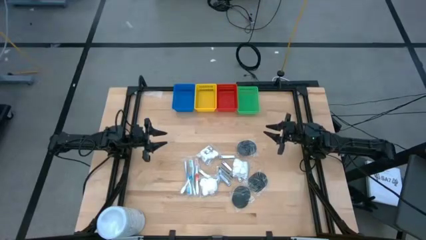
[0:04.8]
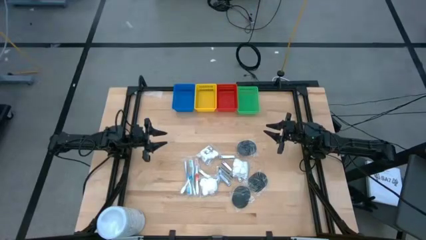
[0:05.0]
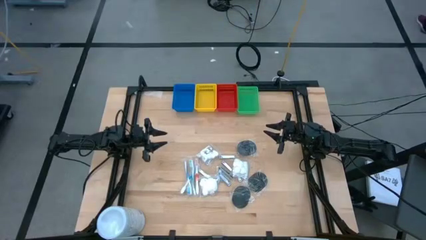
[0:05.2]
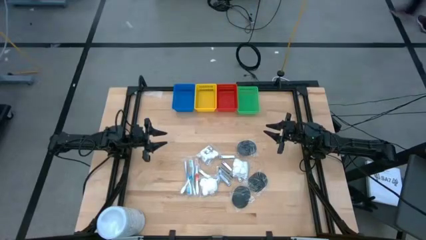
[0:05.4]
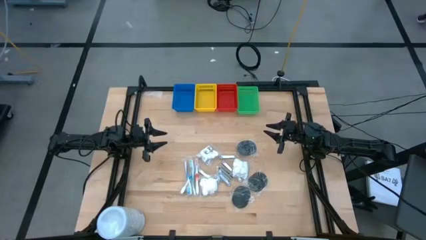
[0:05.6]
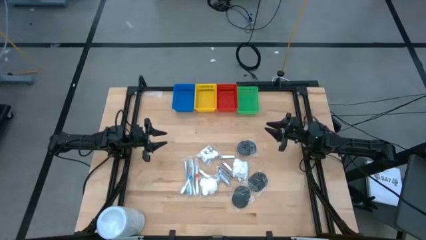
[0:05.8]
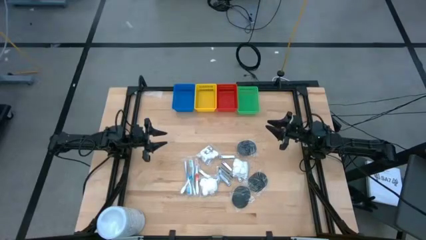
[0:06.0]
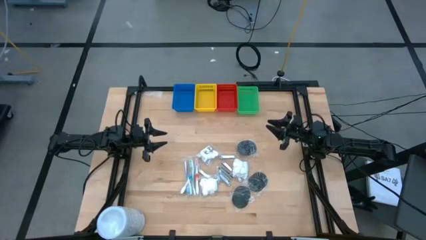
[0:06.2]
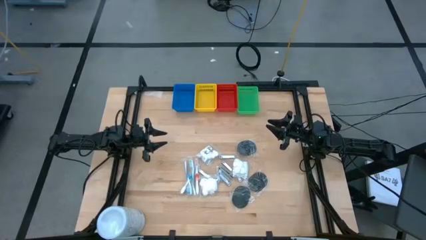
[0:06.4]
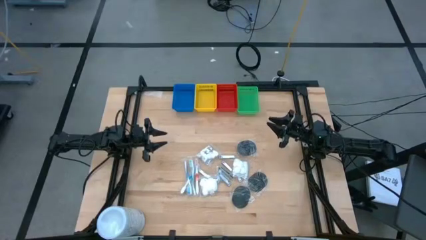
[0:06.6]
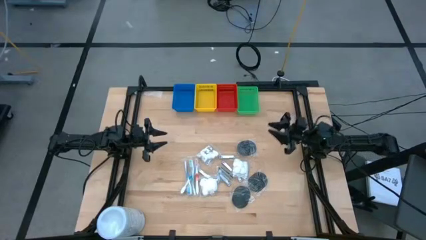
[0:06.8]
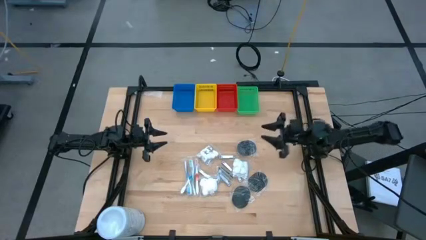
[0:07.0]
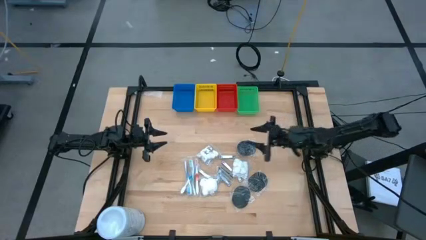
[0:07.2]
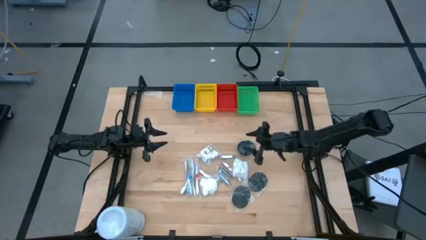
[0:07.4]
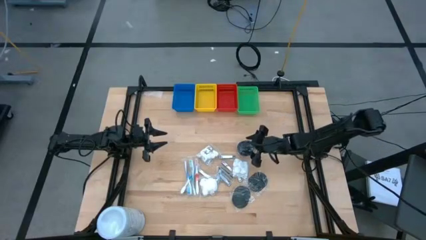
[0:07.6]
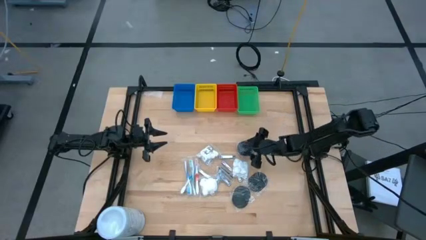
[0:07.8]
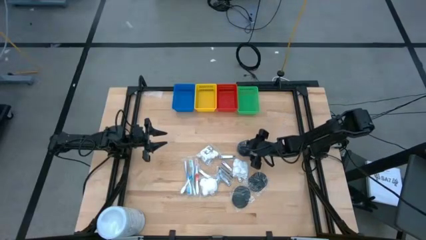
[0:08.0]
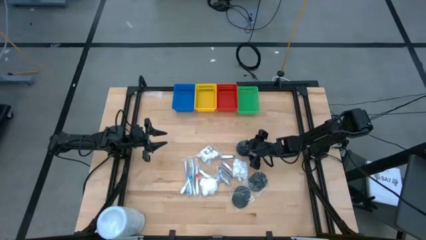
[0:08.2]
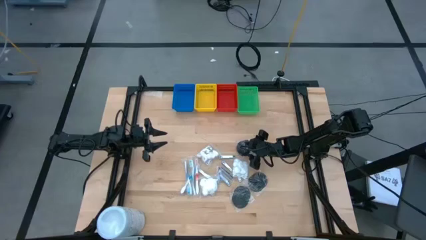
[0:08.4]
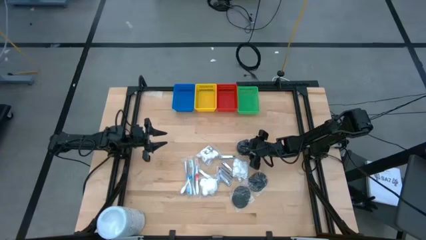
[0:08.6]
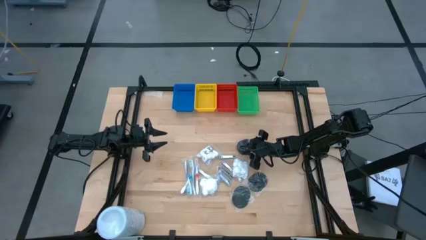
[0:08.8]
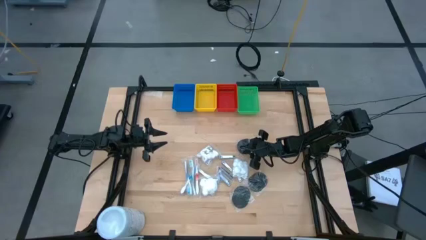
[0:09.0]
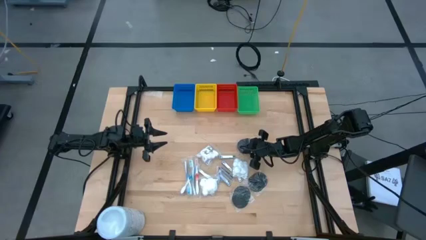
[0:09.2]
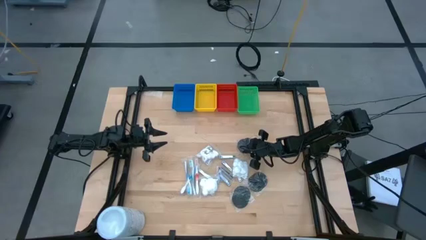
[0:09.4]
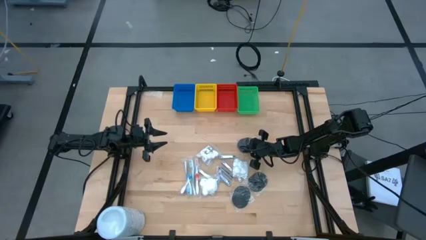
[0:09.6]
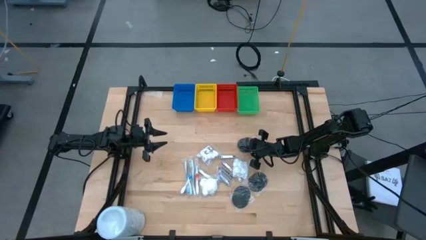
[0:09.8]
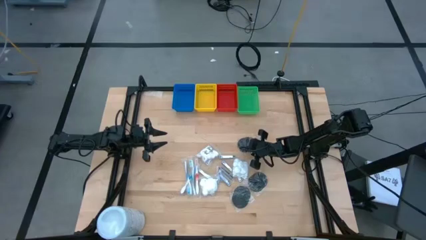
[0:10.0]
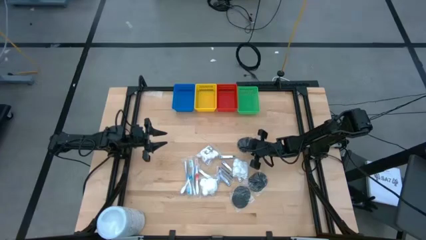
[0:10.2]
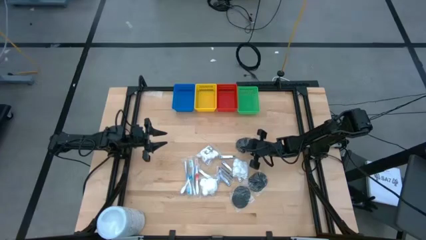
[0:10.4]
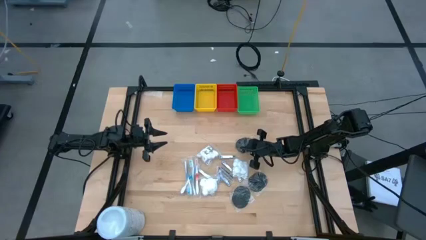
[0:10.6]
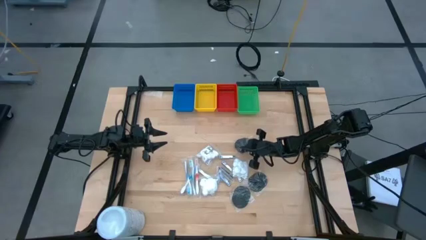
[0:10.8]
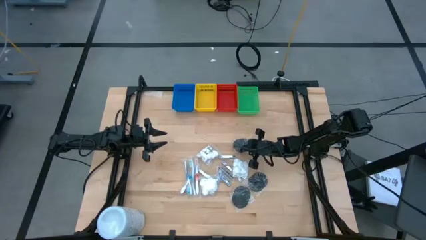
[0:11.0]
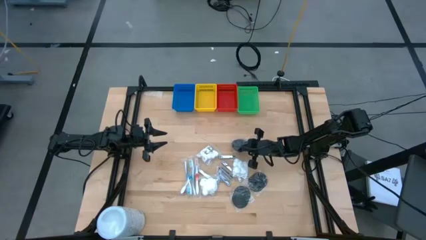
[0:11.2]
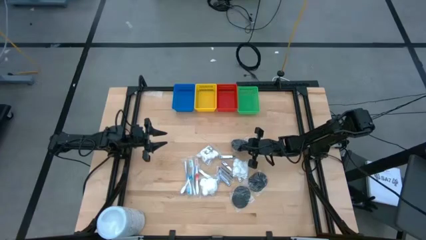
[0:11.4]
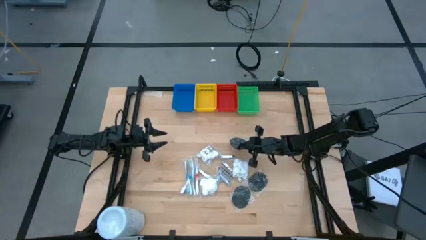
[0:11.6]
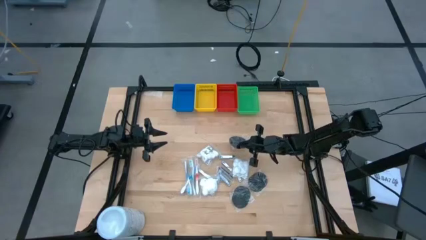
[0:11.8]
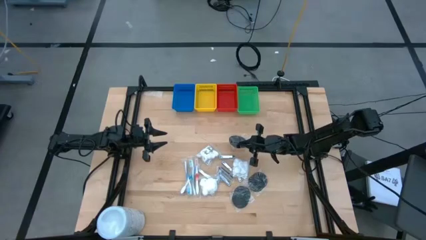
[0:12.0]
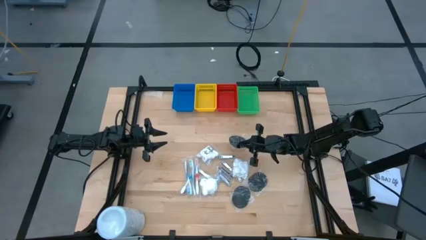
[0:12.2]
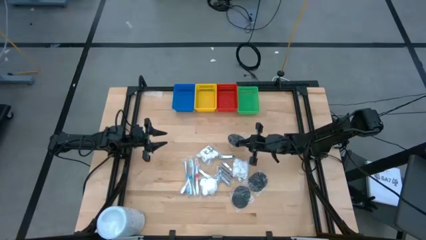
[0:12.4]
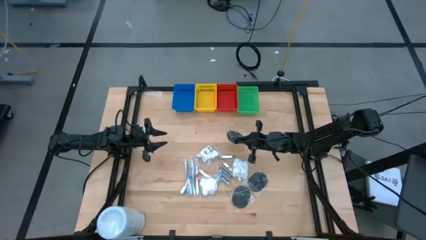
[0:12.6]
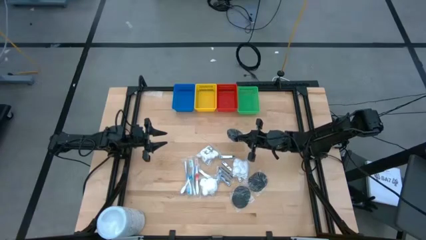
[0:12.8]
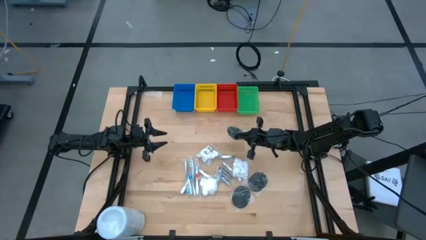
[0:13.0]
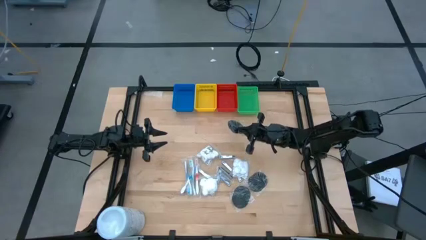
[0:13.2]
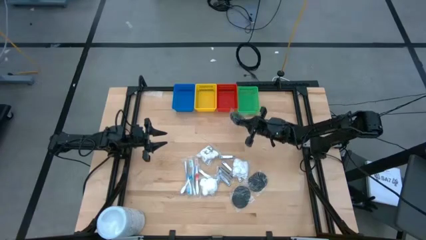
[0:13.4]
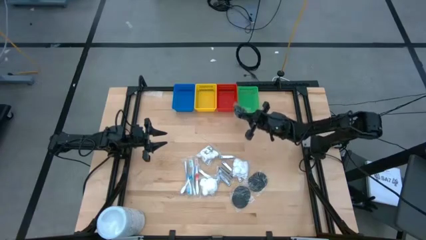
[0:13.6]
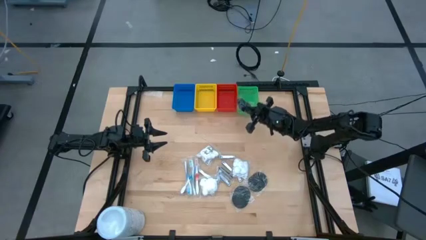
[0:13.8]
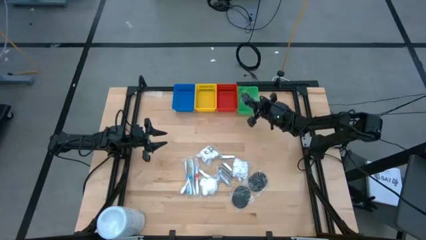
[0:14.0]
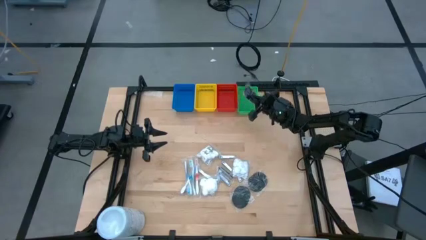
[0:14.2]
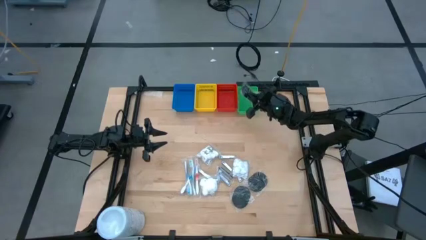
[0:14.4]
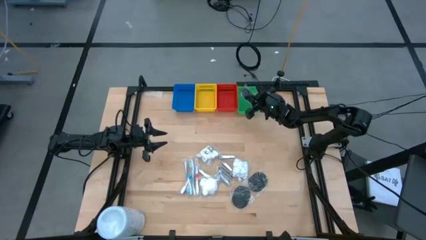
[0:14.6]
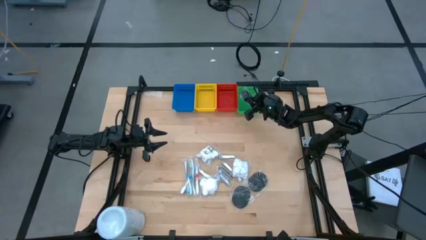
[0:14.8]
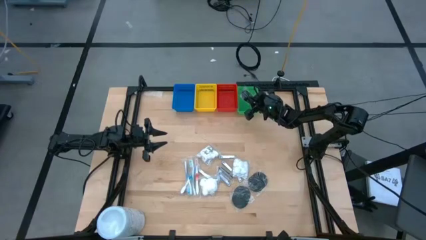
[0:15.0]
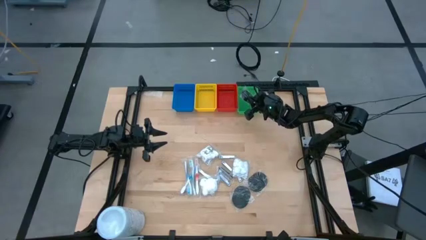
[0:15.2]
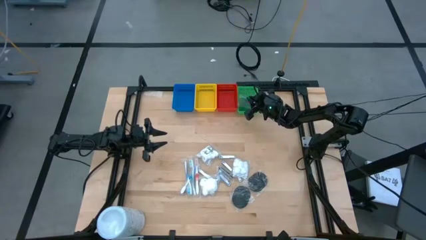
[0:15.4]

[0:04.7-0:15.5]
Task: Pick & Place Travel size toiletries
Put the hairbrush into the green bin

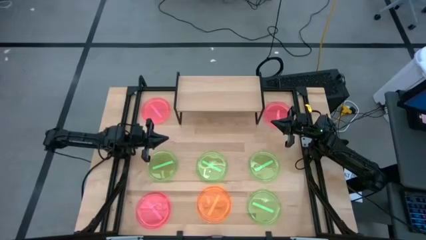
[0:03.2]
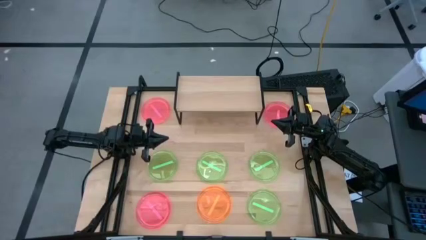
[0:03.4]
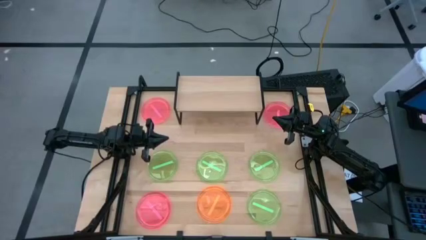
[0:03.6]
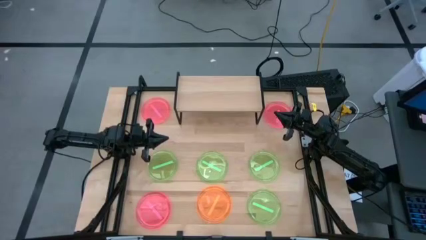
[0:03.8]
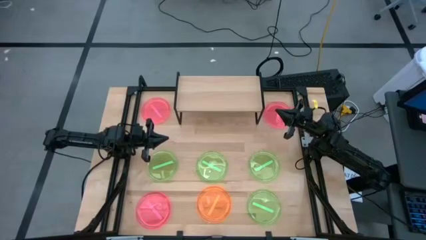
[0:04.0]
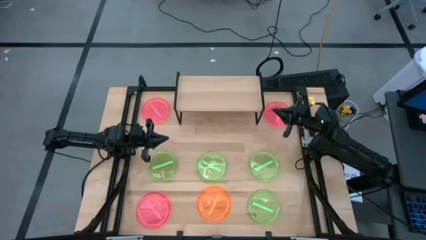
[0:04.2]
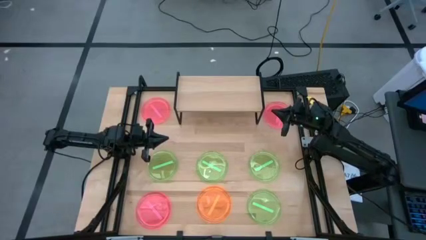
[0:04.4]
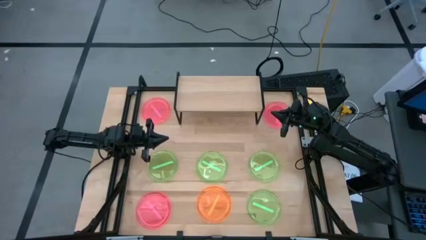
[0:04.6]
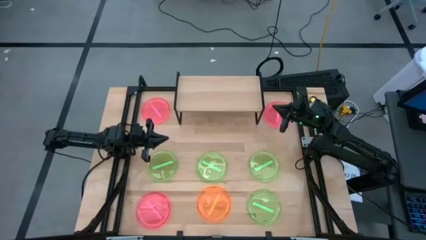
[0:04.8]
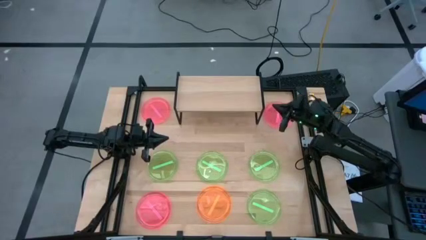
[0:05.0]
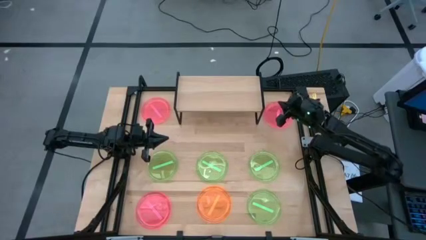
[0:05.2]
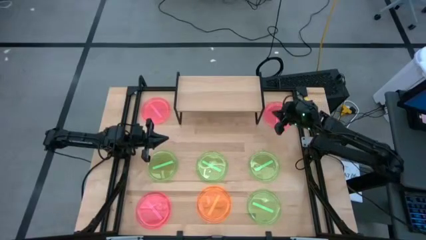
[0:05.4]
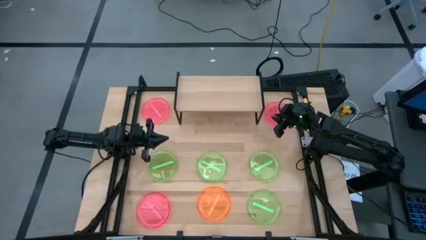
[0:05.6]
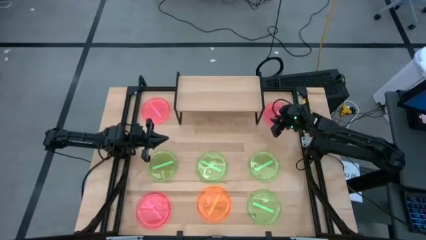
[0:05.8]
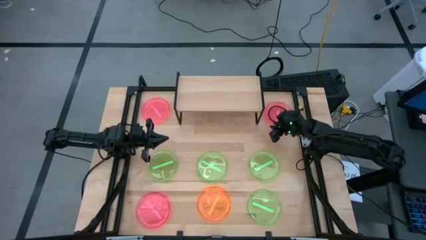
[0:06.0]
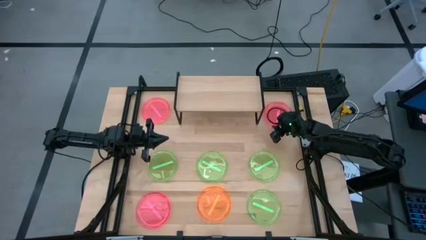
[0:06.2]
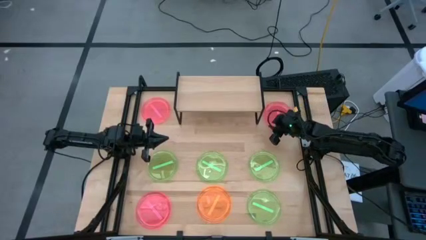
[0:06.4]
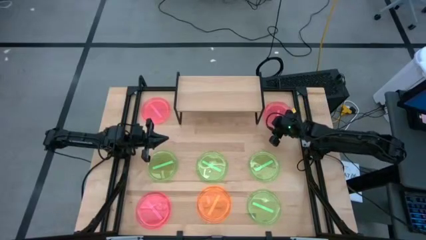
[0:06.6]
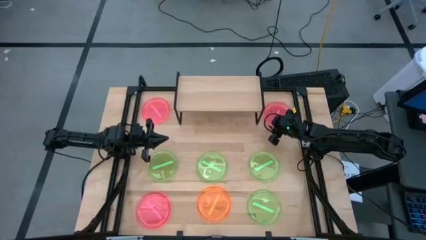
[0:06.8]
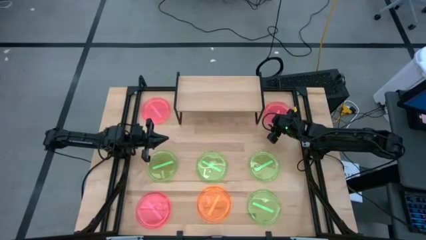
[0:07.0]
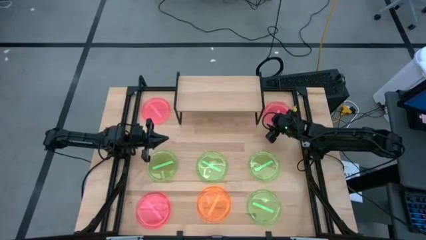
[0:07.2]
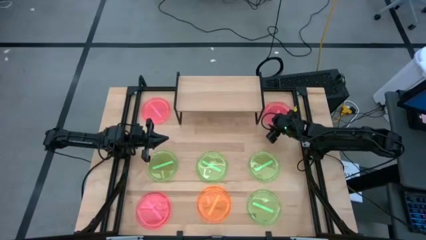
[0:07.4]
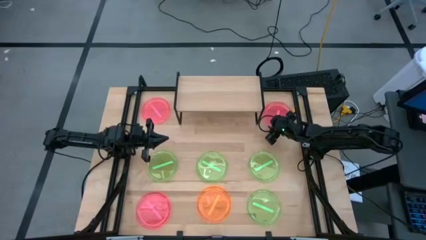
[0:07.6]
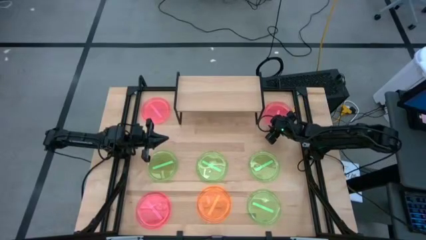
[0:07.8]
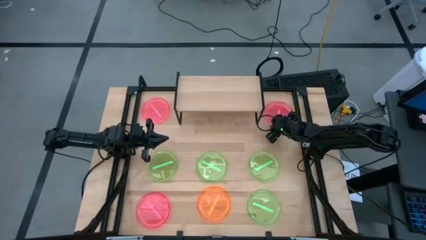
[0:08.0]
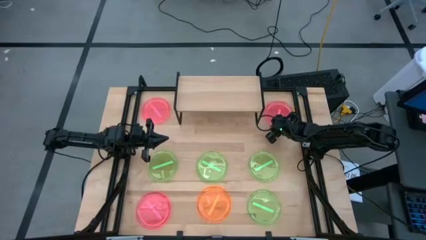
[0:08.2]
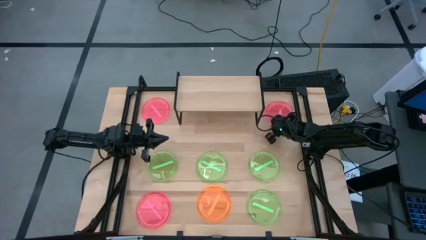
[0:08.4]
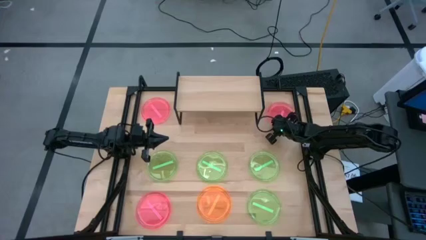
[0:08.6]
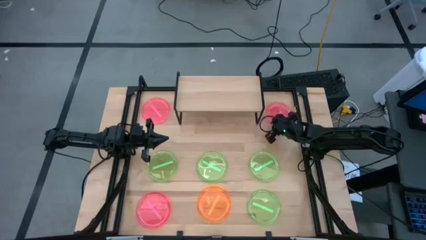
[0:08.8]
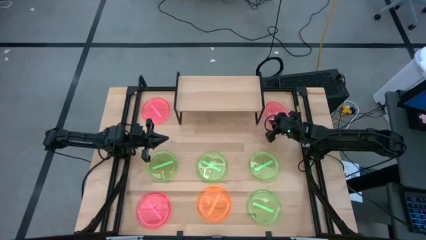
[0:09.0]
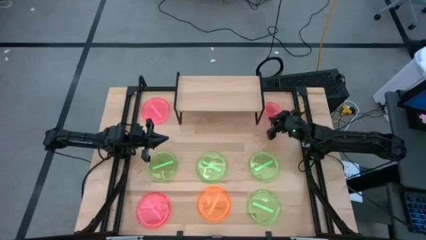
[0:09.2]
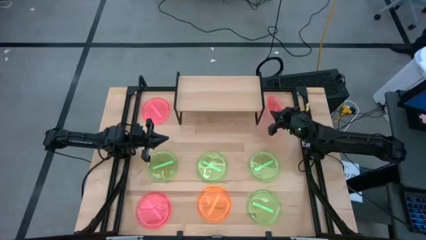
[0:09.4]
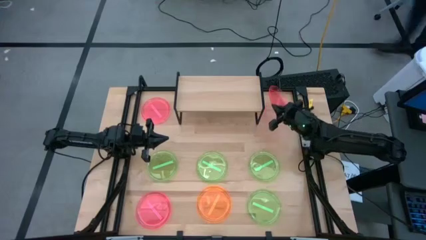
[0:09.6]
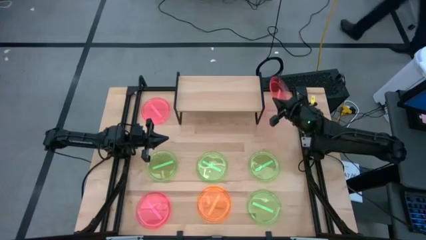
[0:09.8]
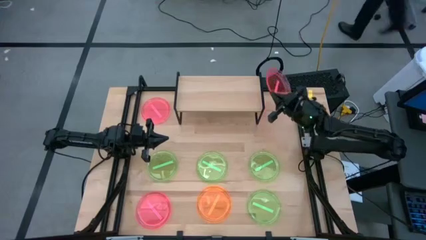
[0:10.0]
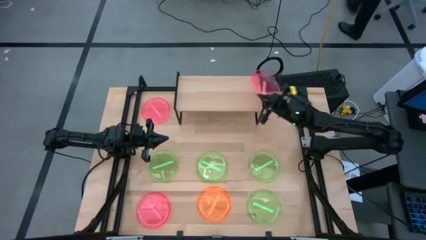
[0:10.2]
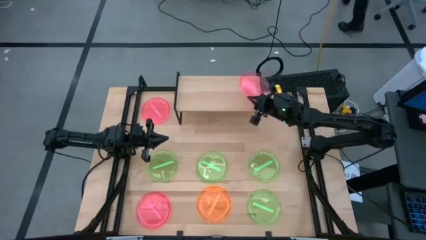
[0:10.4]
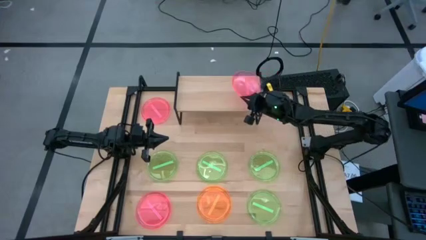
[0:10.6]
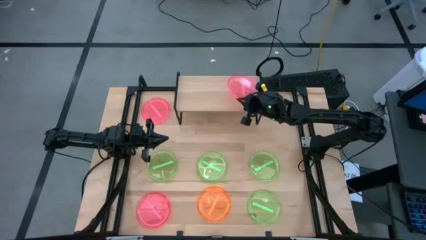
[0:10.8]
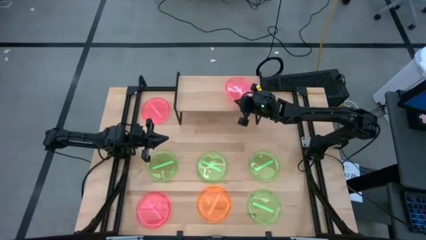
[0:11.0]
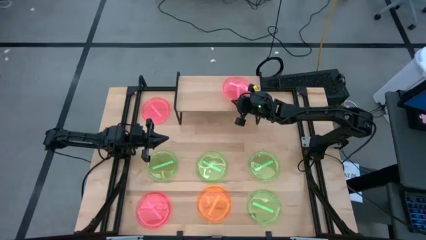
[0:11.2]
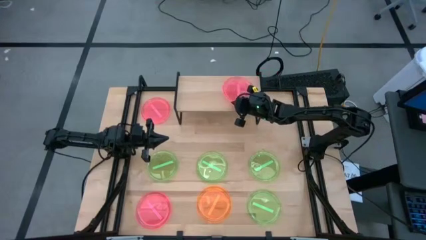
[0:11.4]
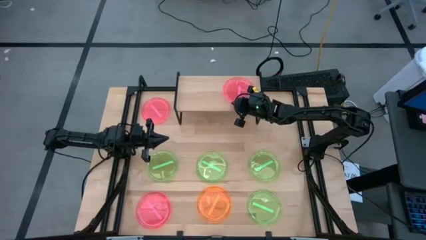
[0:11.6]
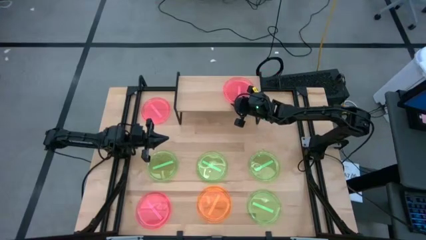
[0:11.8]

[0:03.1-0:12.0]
Task: Place and stack plates onto a shelf
Put the right red plate on the shelf
